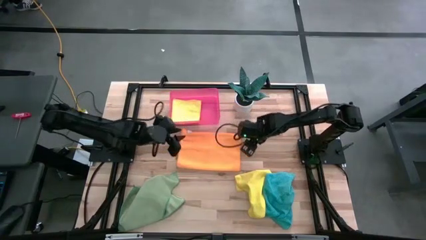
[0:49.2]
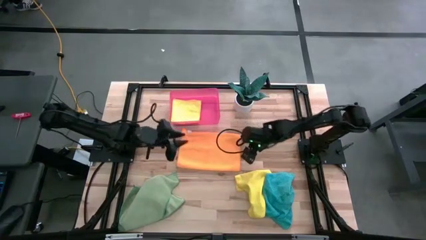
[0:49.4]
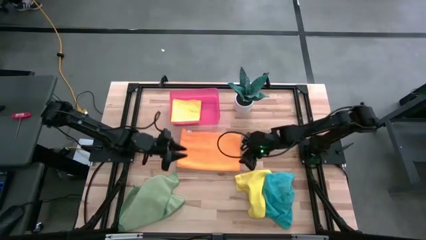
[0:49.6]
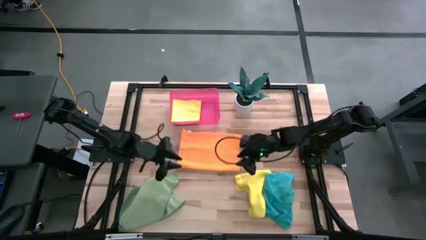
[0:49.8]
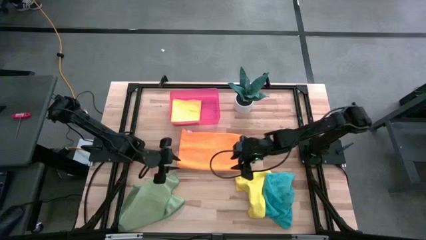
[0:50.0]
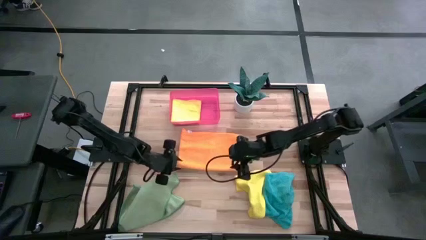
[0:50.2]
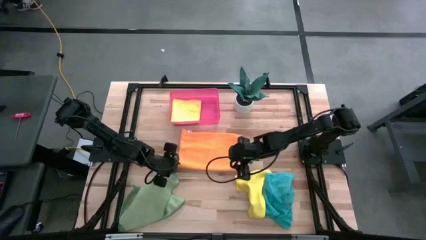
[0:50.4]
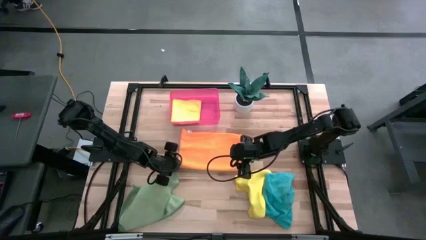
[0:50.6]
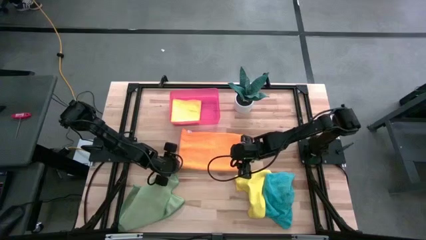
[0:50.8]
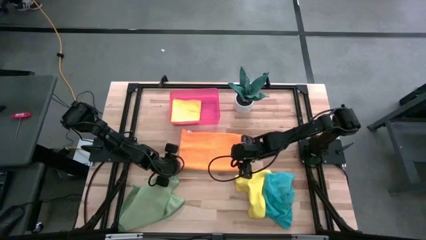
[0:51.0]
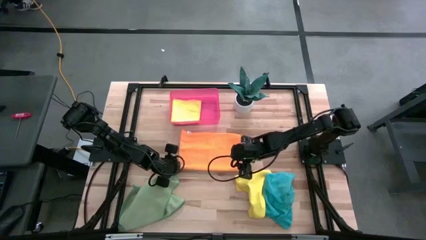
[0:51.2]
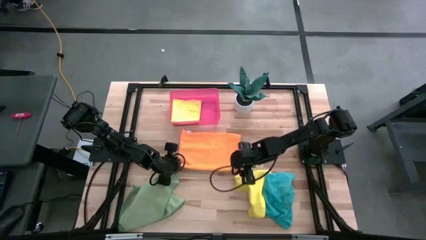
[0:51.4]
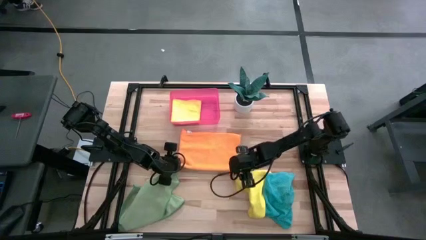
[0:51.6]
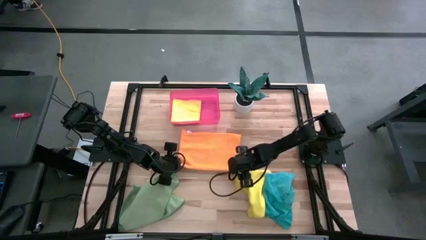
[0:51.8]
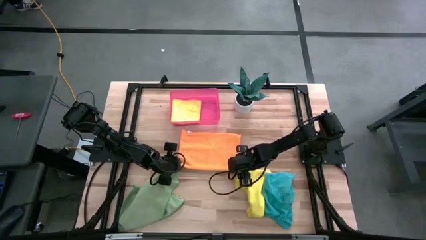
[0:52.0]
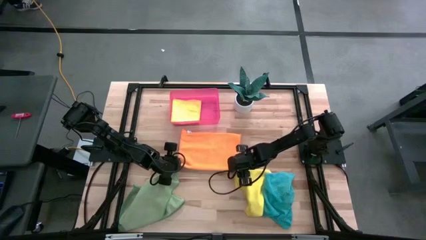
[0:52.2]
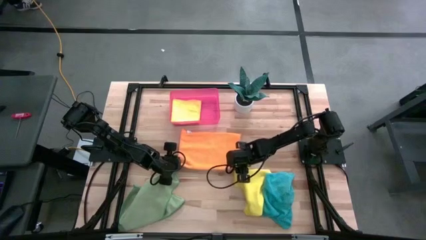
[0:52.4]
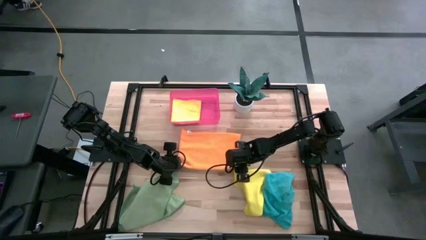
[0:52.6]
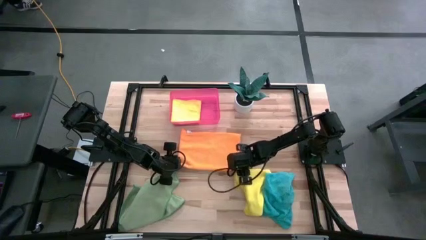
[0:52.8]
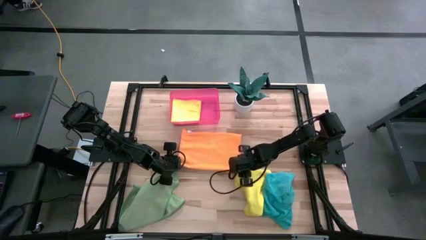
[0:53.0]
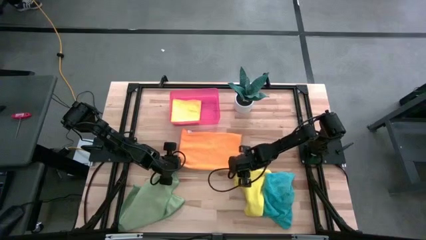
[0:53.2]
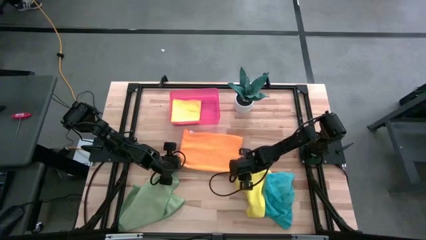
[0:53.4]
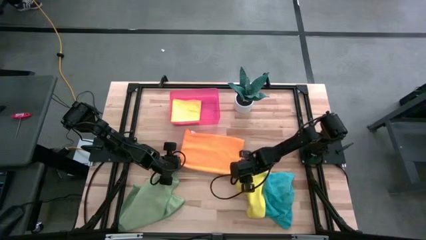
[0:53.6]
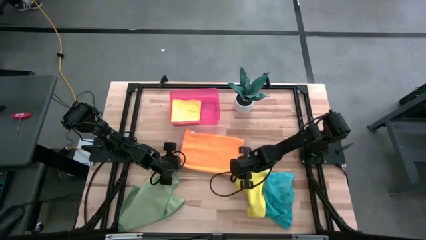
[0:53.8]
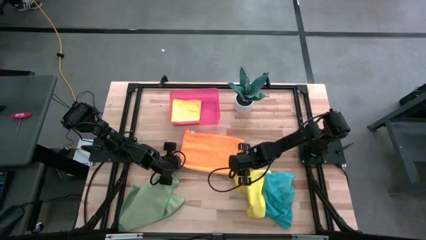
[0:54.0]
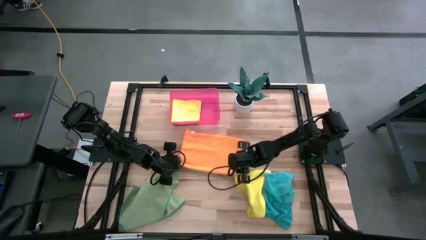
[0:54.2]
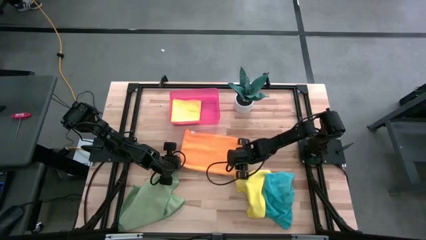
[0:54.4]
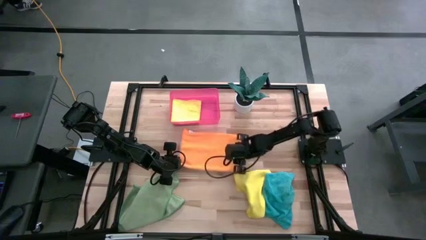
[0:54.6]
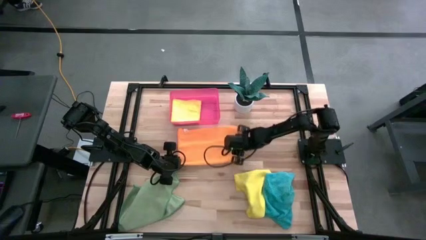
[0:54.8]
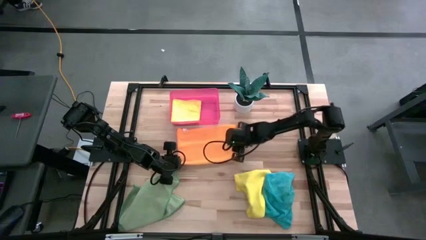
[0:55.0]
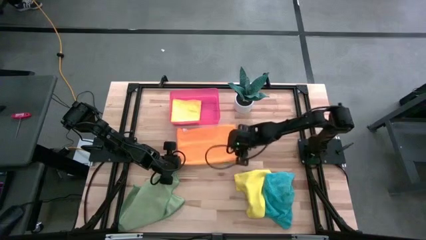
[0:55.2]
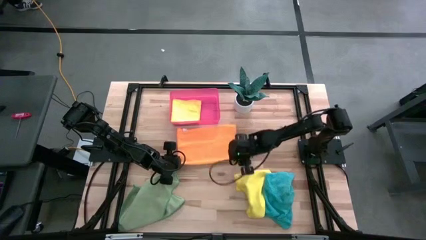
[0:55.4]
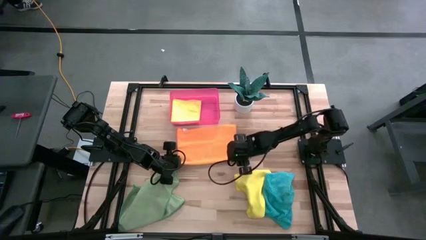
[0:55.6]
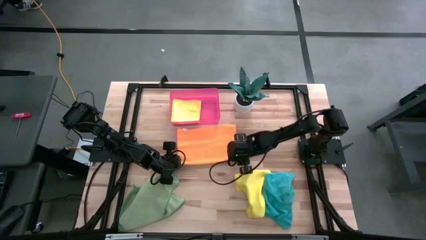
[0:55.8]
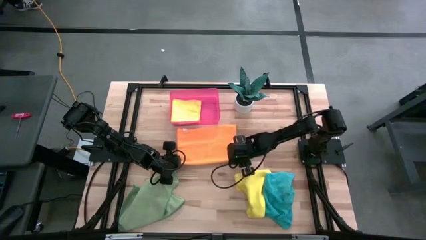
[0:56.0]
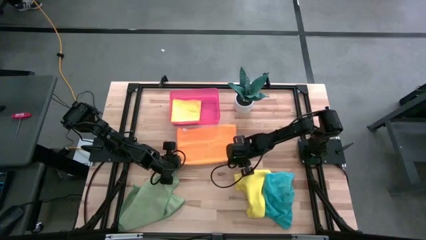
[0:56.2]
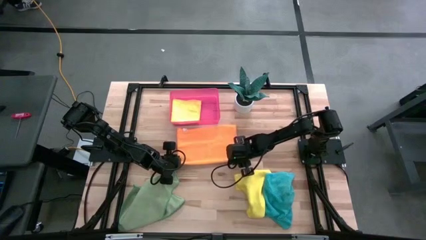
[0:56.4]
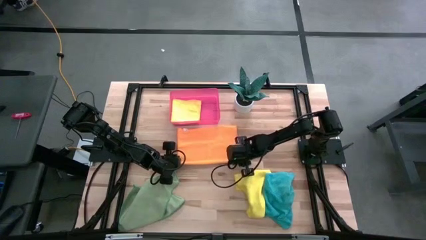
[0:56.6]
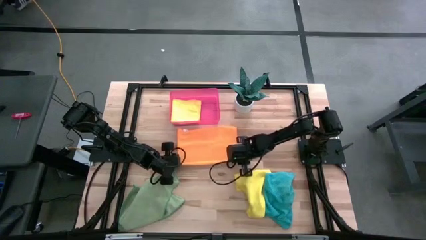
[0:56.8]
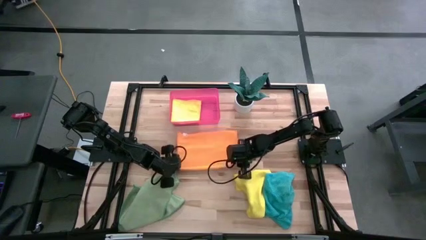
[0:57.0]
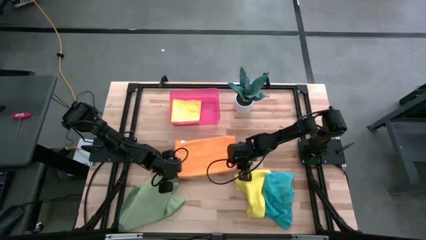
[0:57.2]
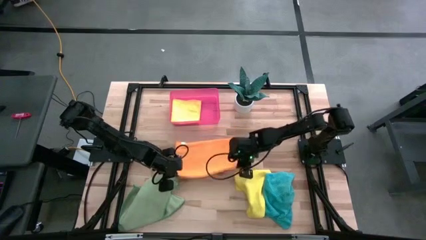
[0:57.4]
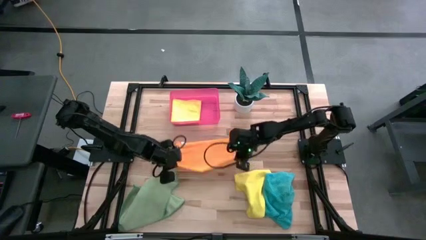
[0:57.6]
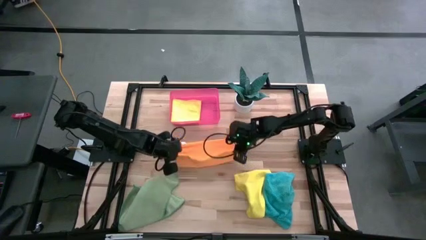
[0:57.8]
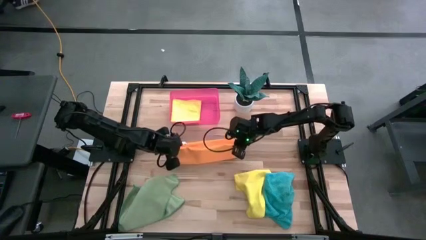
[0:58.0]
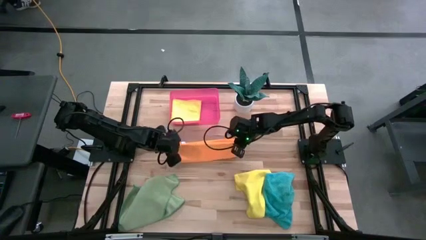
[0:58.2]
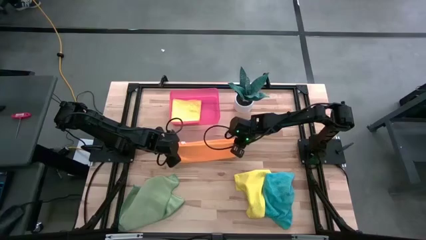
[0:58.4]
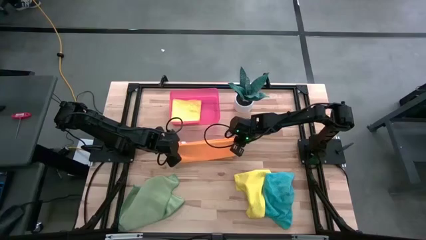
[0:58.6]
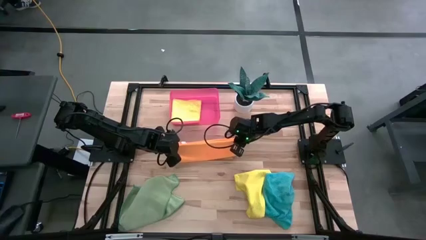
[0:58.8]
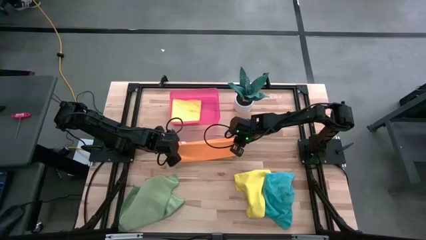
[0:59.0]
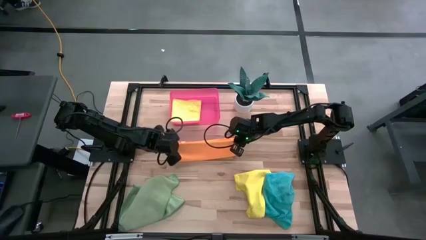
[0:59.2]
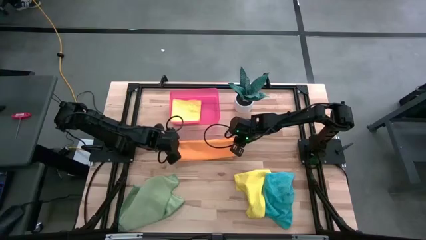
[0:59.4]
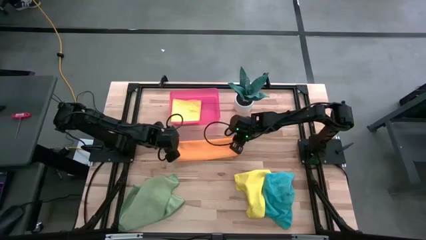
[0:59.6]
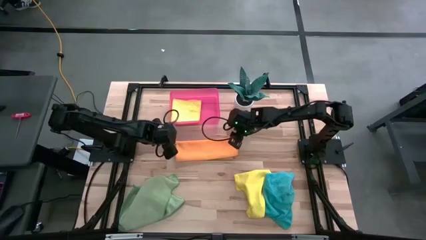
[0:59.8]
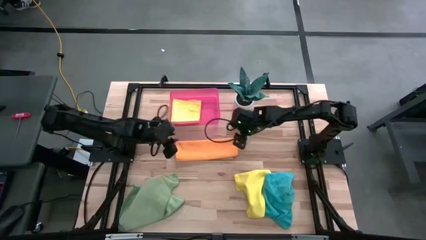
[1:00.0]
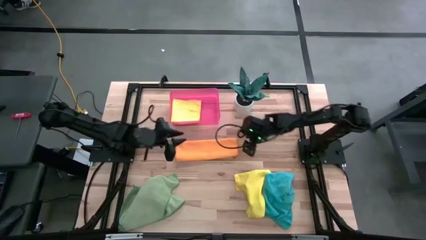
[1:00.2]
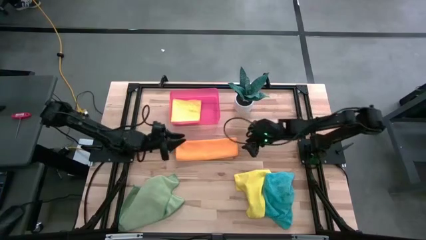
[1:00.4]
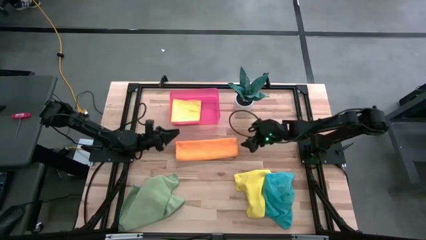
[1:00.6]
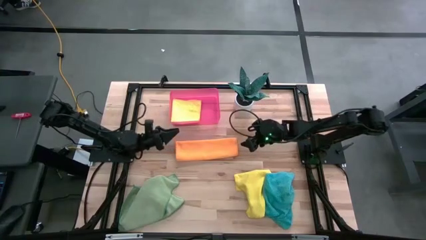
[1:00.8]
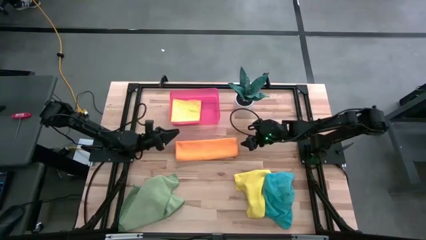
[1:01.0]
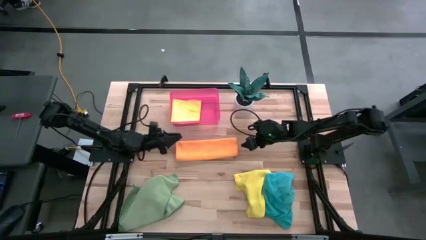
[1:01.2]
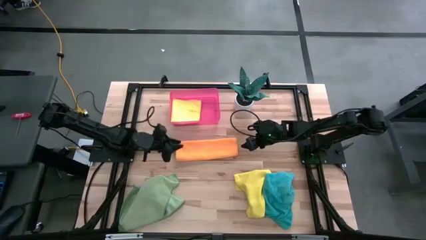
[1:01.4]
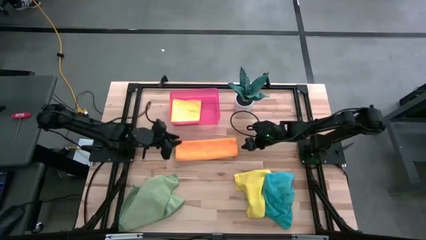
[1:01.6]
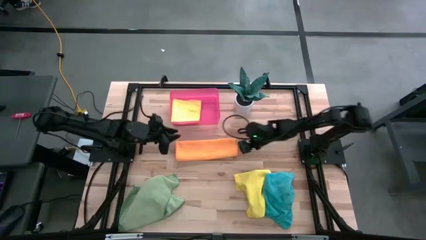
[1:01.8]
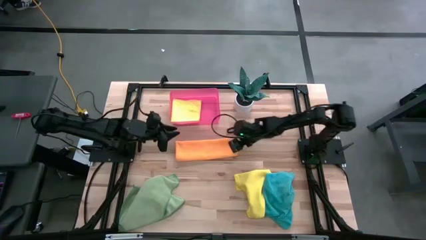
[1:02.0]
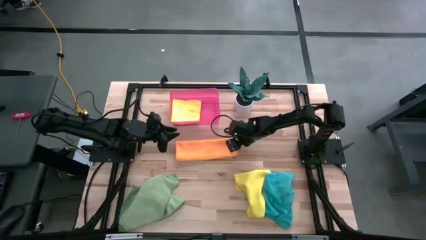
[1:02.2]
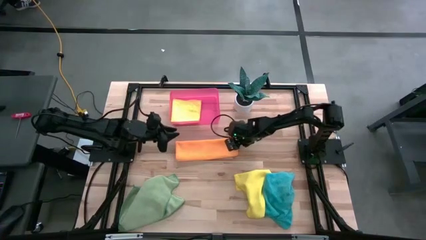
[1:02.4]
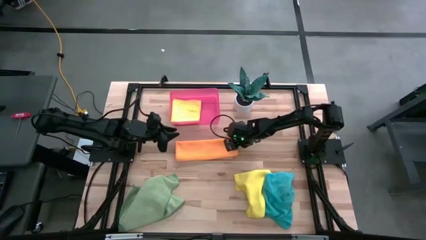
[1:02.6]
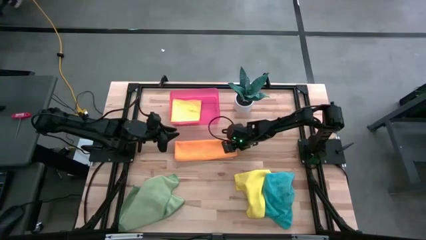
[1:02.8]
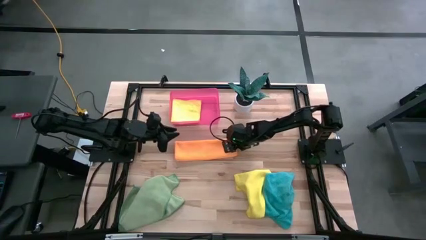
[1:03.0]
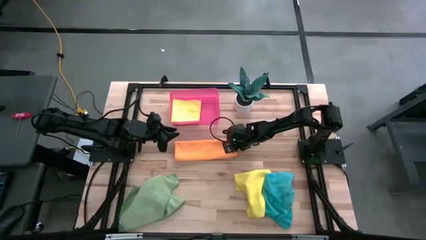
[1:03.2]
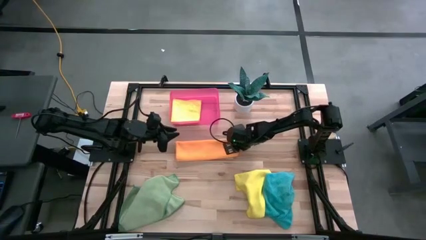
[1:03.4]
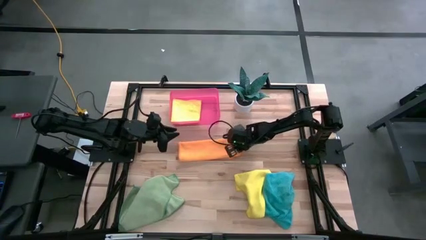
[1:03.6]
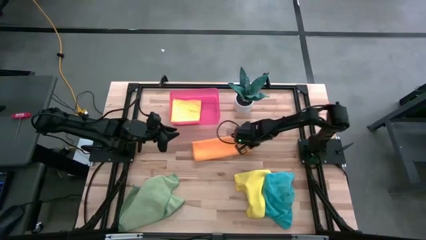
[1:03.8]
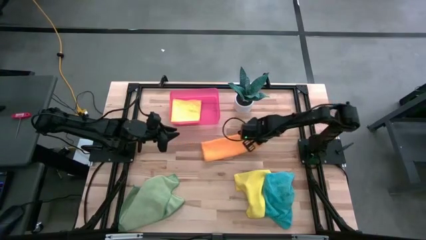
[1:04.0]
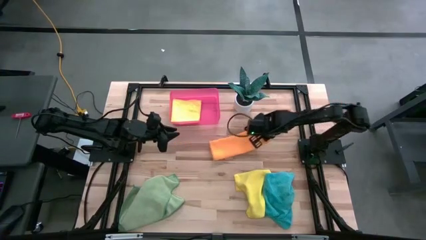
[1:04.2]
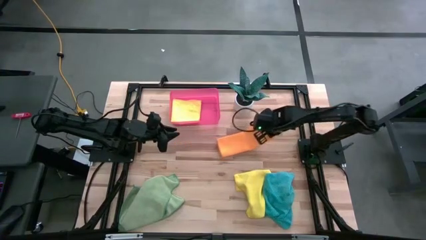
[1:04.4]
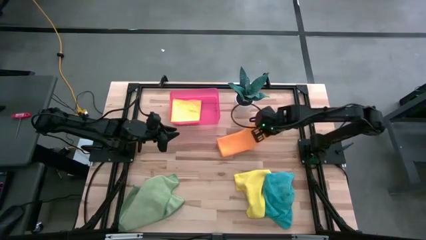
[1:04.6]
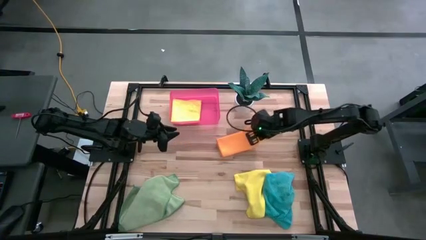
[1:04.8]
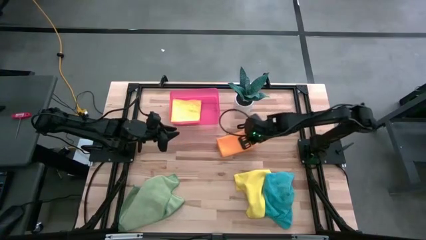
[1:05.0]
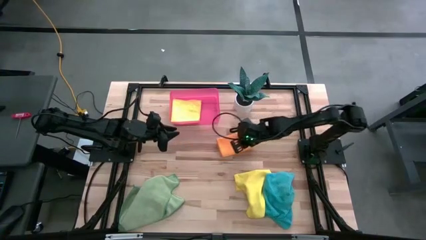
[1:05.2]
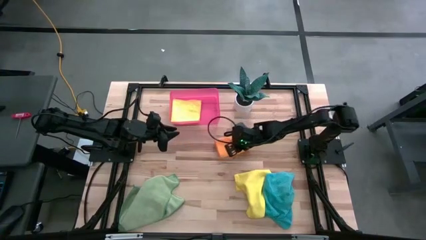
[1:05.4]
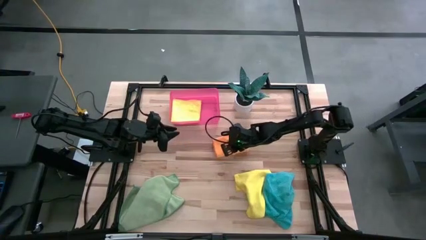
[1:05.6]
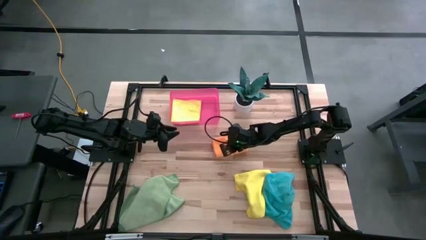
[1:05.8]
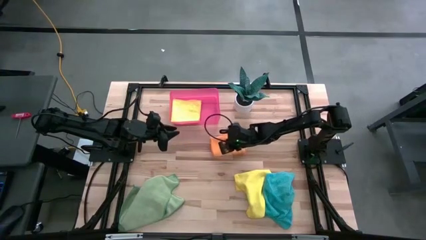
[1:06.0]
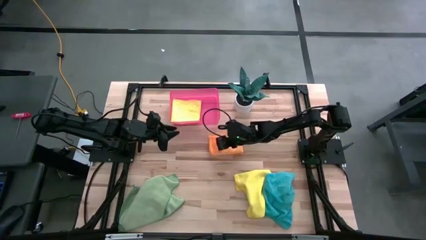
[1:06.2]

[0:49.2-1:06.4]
Task: Fold microfiber towels
Fold the orange microfiber towel
